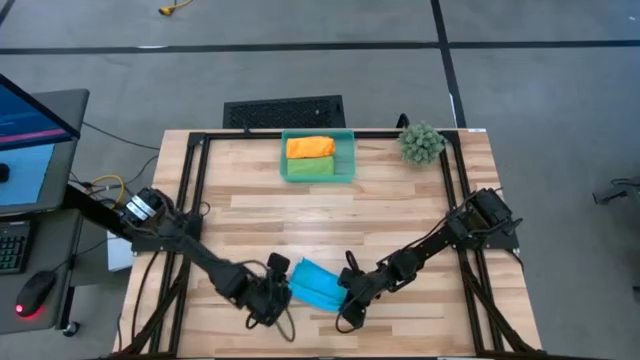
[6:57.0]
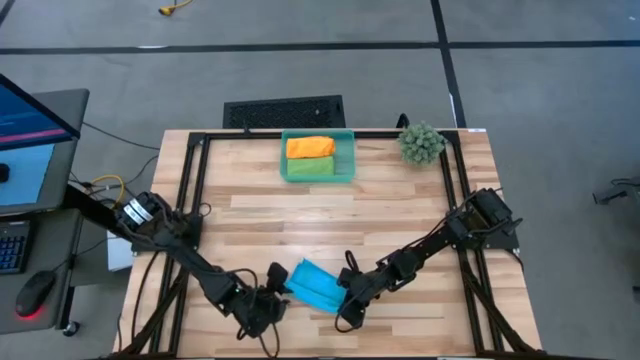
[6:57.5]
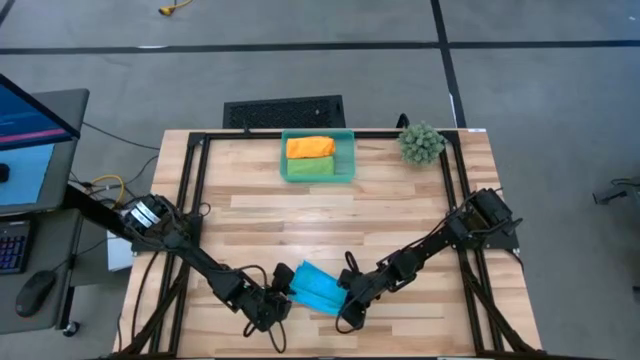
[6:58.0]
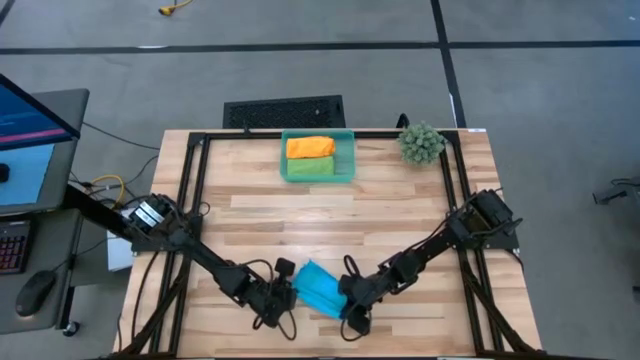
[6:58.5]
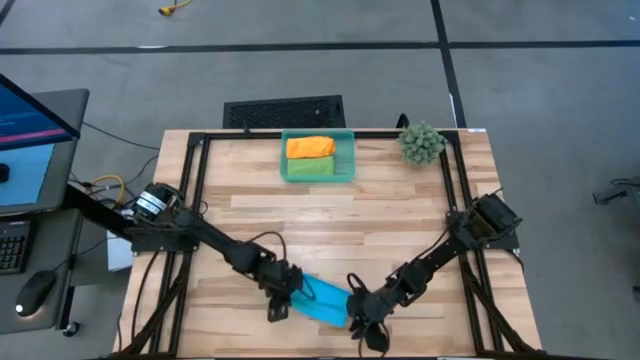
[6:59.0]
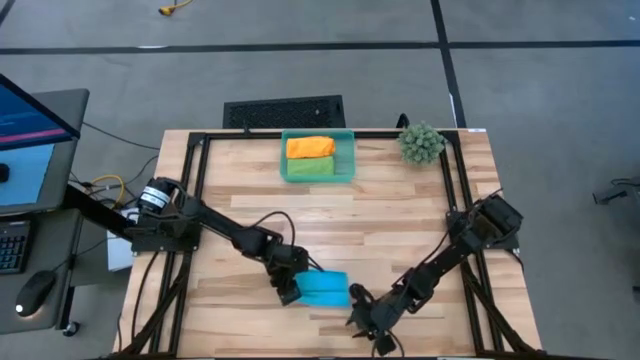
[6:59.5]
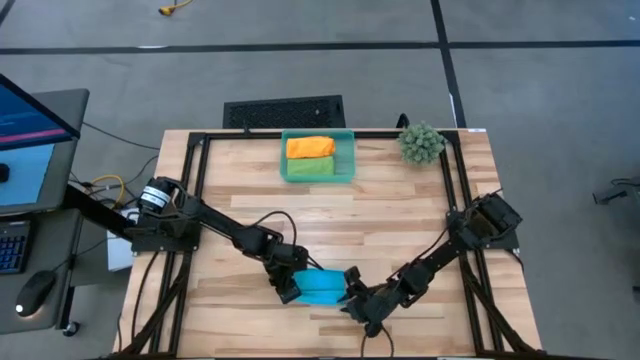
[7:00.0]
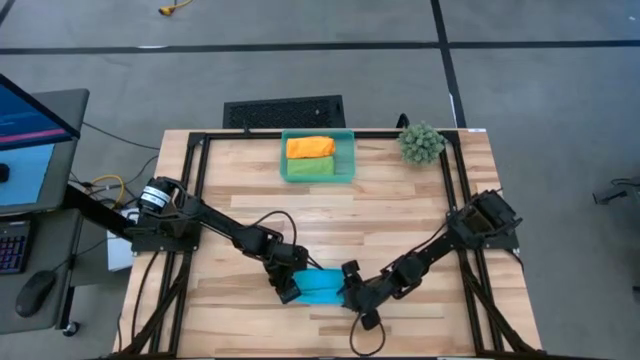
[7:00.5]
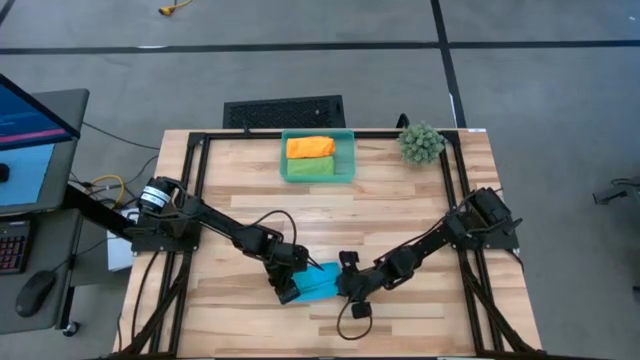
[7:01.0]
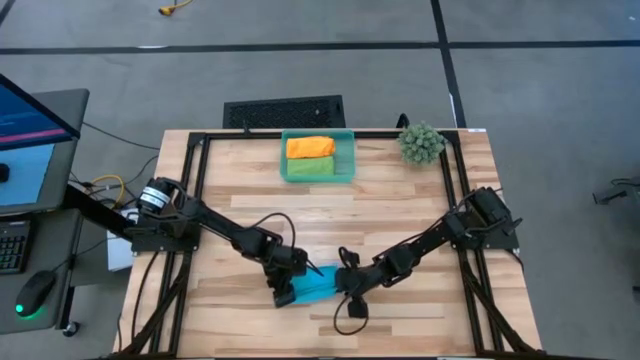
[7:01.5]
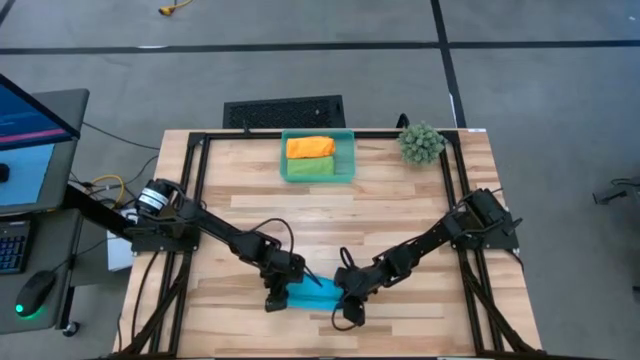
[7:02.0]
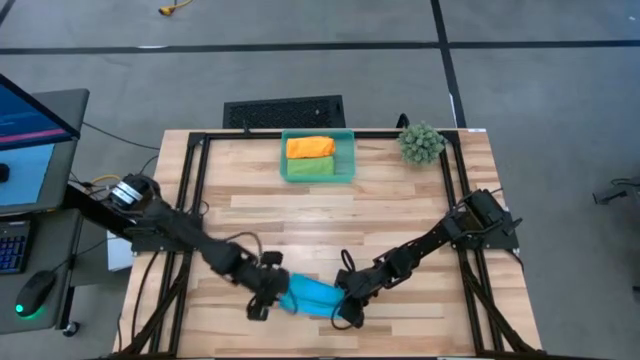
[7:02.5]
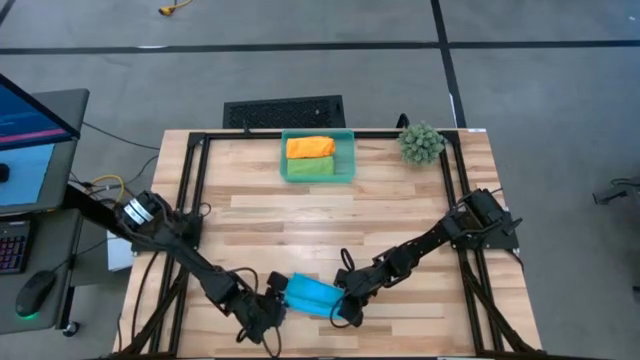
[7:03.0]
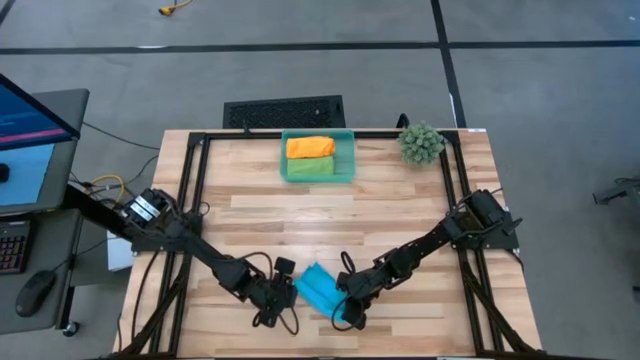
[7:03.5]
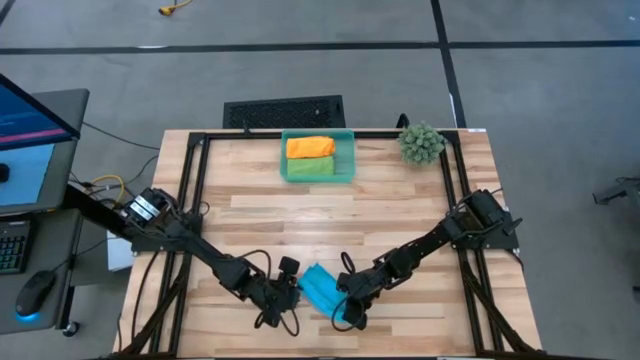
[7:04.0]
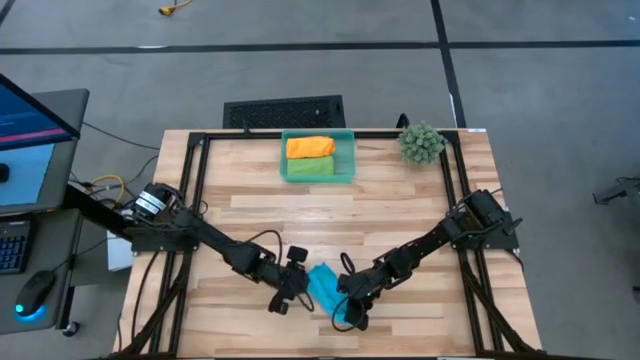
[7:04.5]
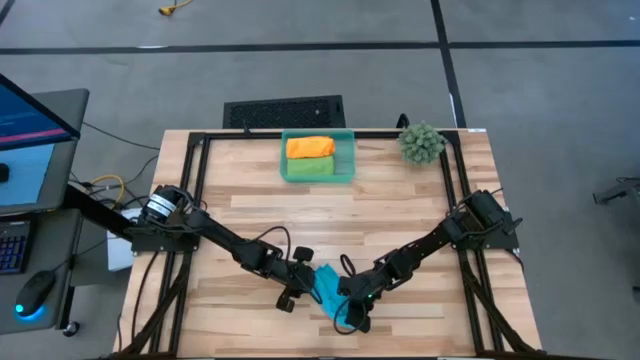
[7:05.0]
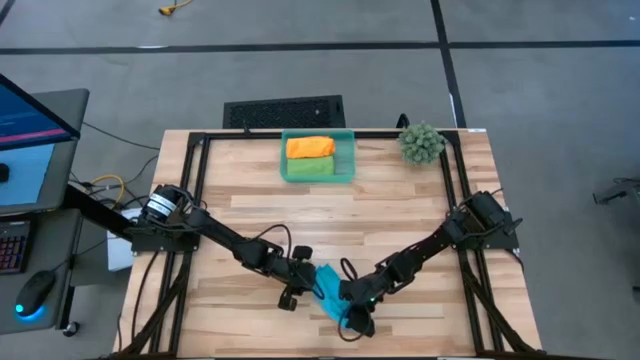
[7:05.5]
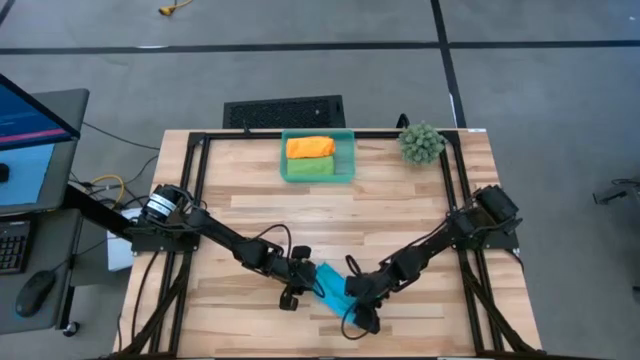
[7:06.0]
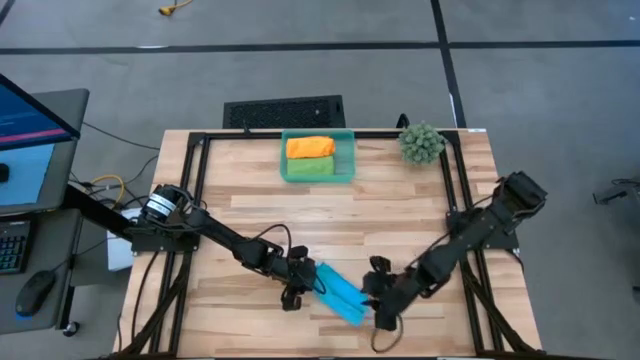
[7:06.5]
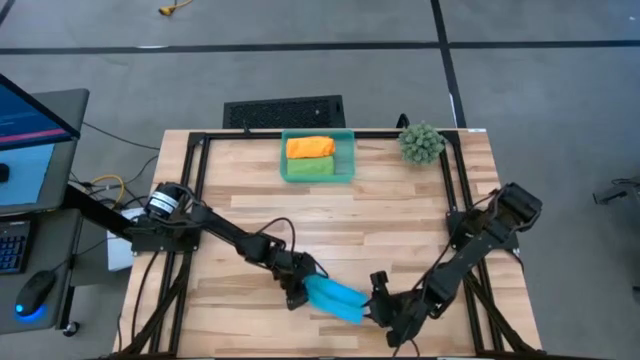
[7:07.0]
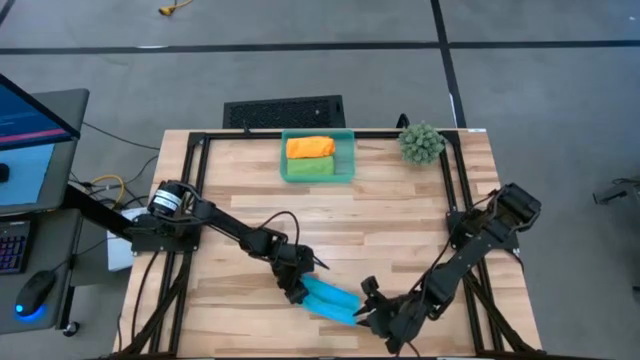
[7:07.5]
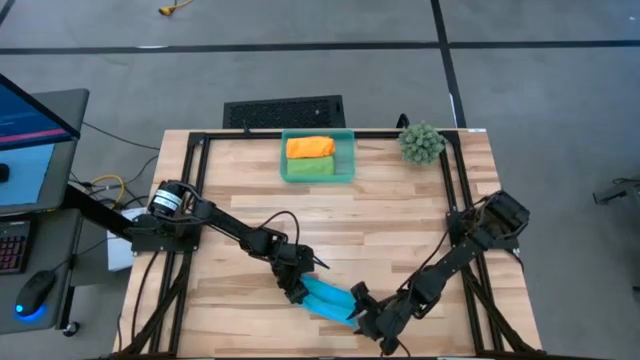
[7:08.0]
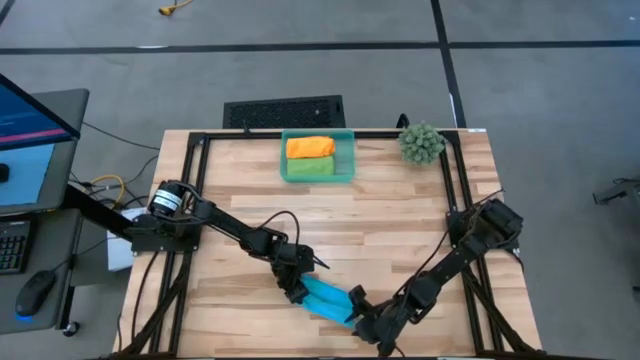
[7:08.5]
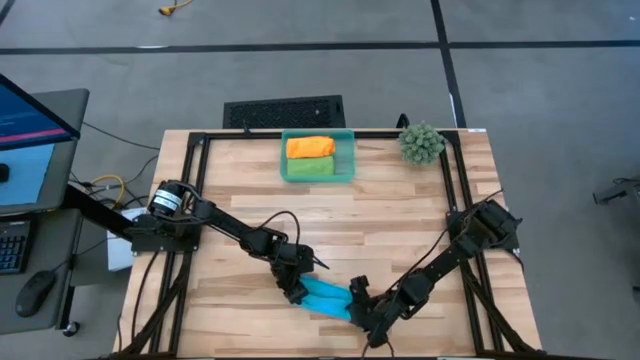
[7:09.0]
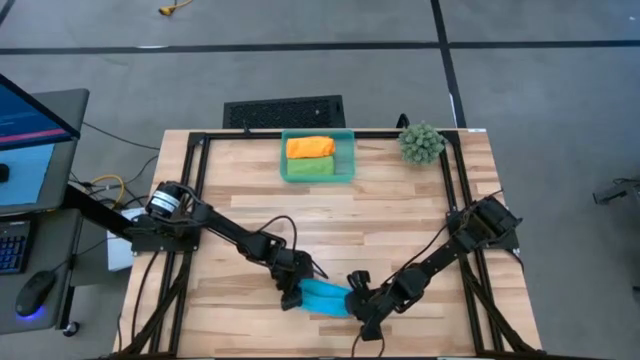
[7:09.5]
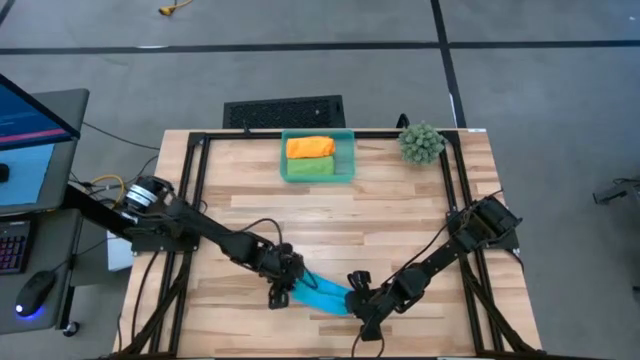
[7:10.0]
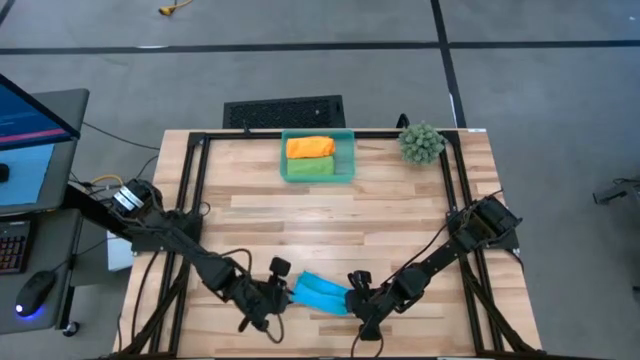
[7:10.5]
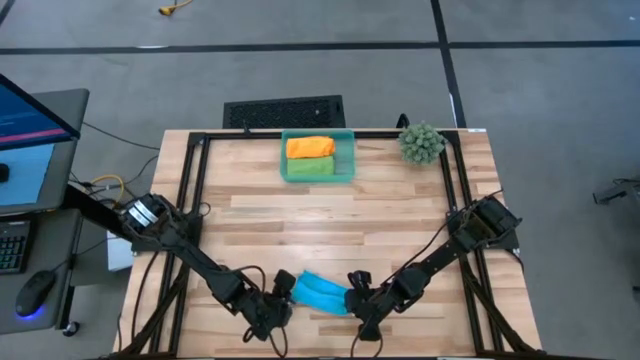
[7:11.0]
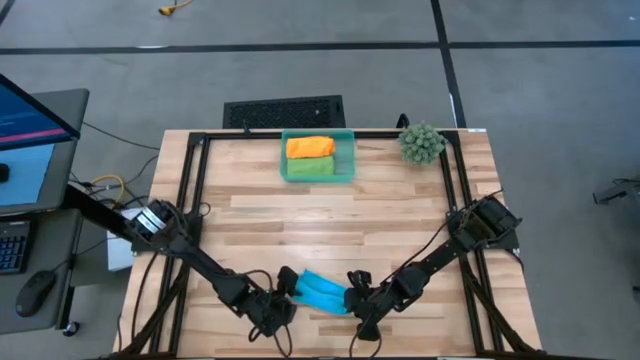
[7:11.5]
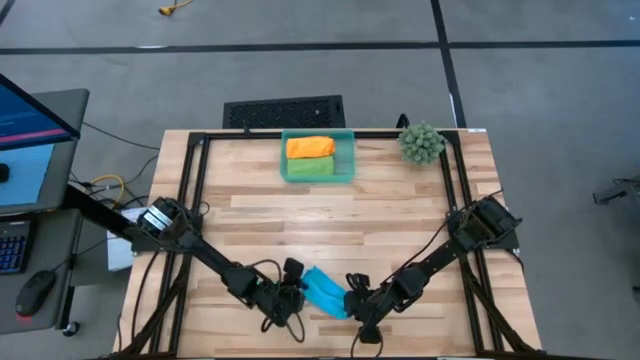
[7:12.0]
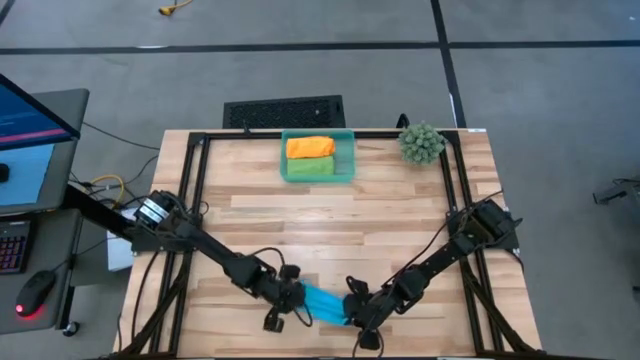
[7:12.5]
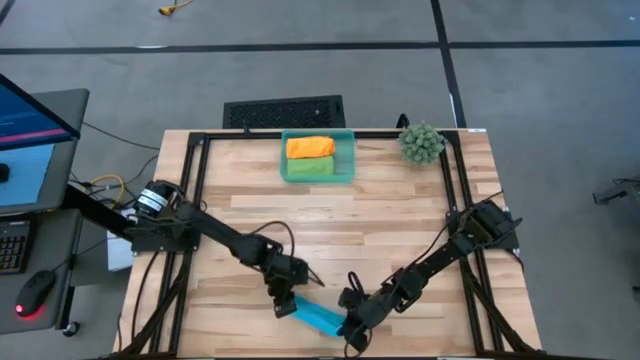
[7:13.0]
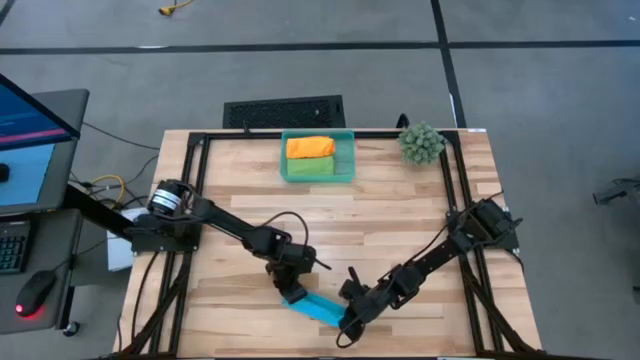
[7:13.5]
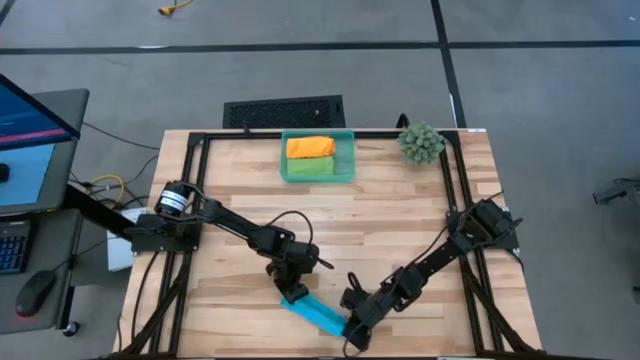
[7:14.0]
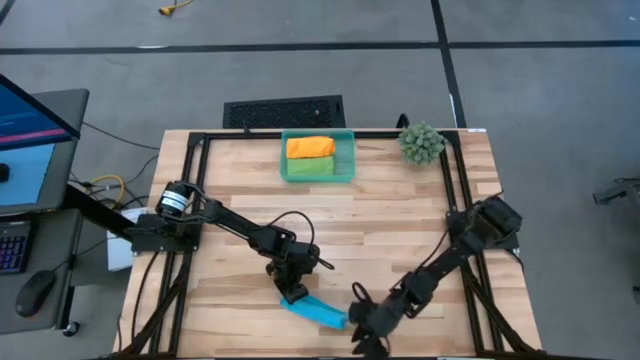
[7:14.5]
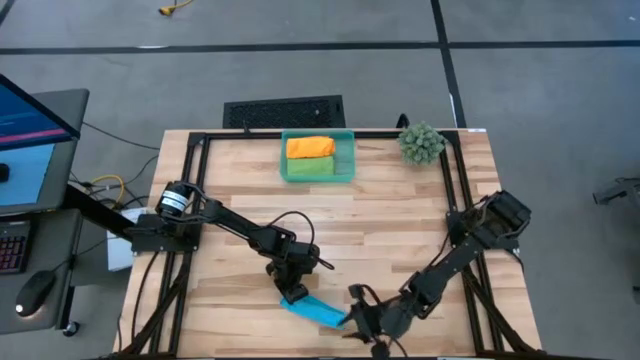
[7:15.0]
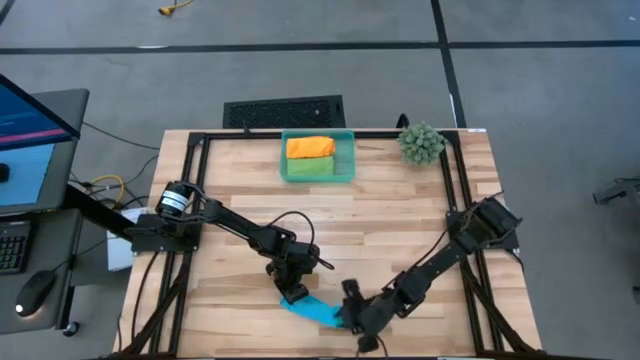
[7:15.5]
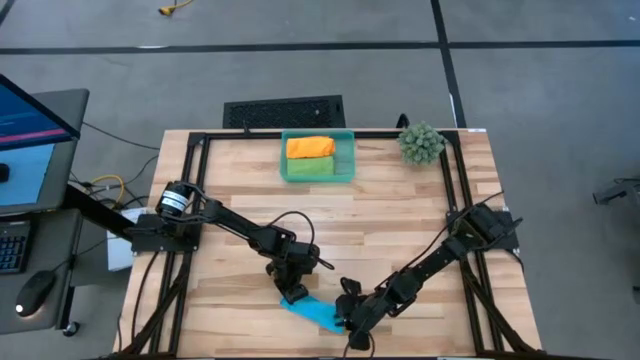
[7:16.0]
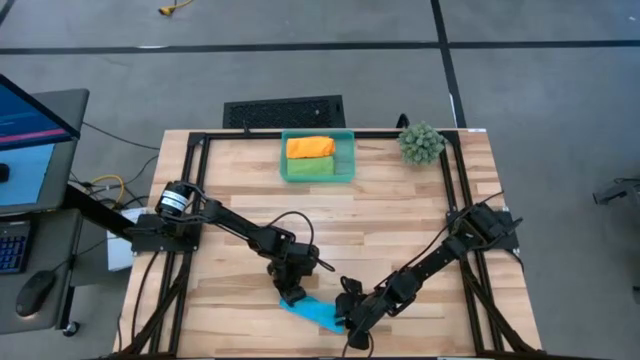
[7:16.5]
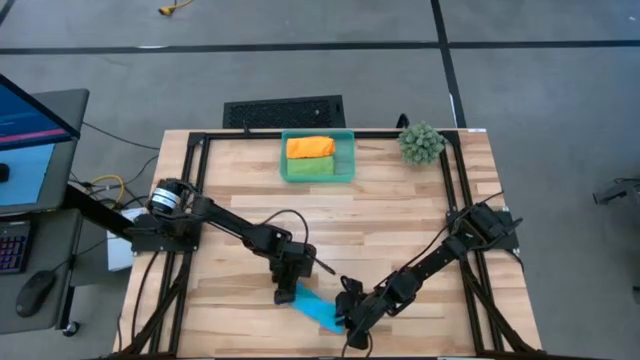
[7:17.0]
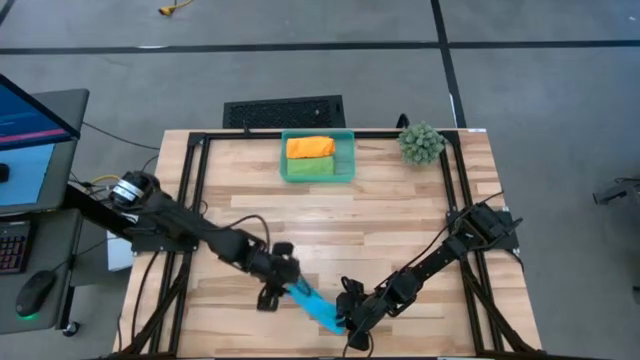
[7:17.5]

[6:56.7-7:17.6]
Task: Roll microfiber towels into tight, uniform cylinder then place into a basket
Roll the blue microfiber cloth
